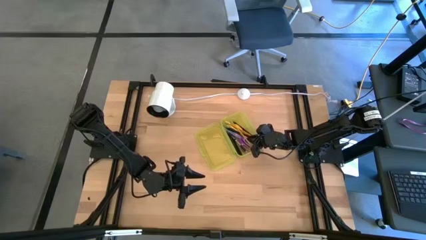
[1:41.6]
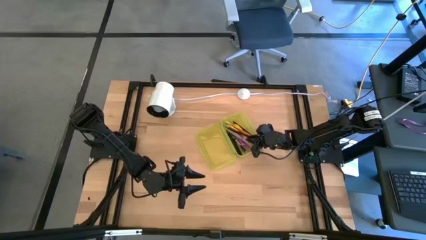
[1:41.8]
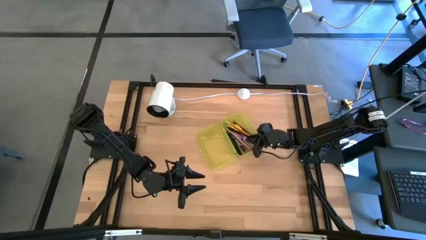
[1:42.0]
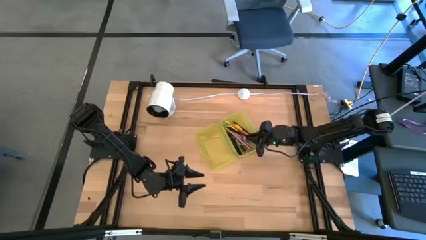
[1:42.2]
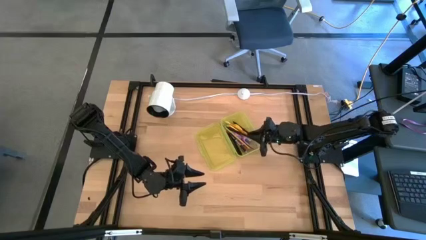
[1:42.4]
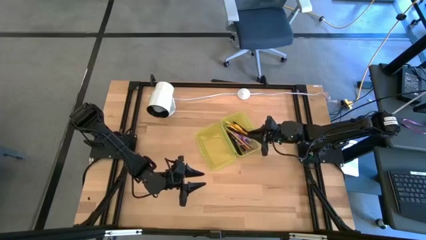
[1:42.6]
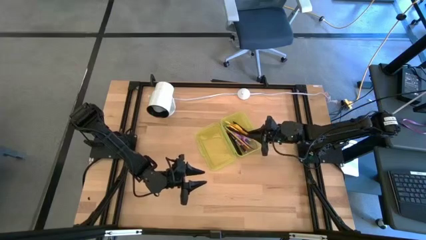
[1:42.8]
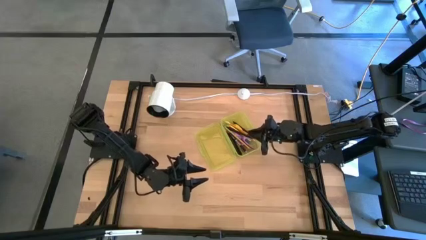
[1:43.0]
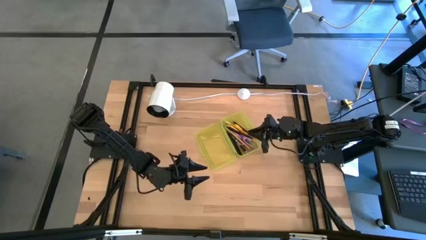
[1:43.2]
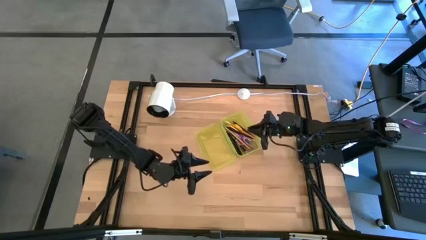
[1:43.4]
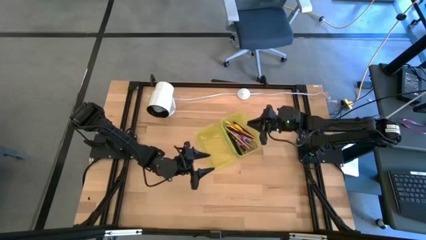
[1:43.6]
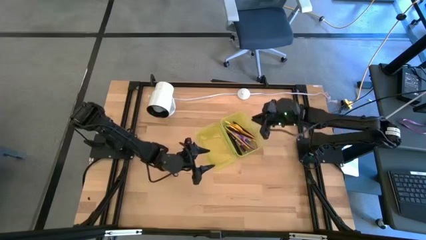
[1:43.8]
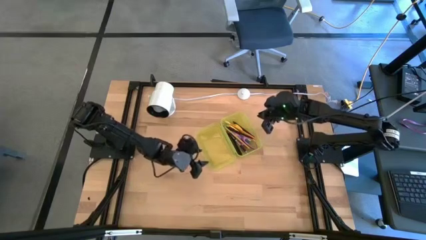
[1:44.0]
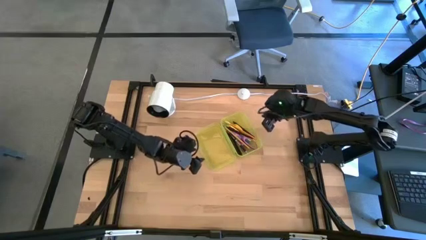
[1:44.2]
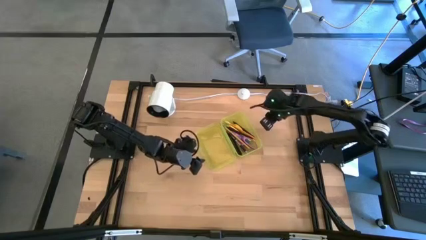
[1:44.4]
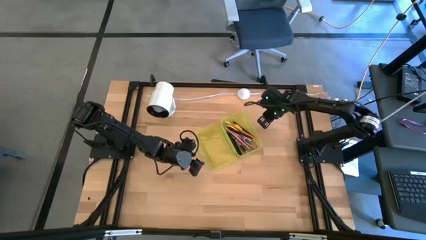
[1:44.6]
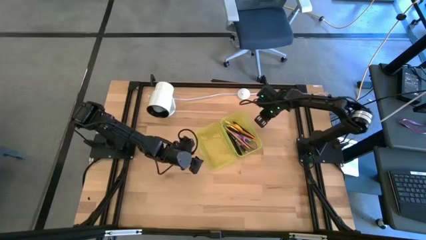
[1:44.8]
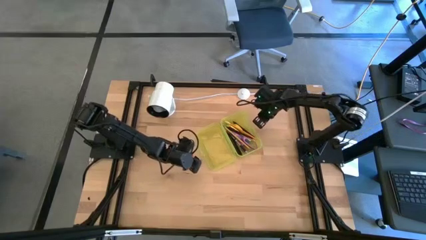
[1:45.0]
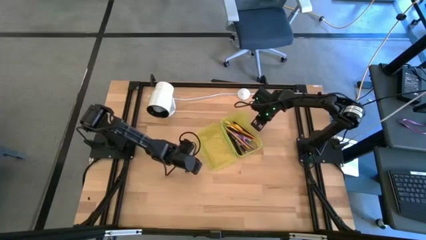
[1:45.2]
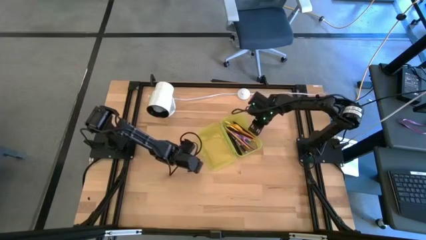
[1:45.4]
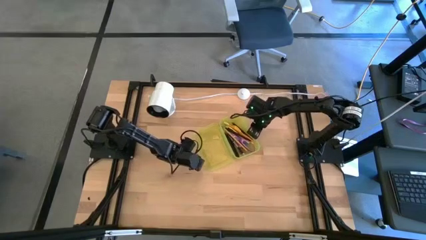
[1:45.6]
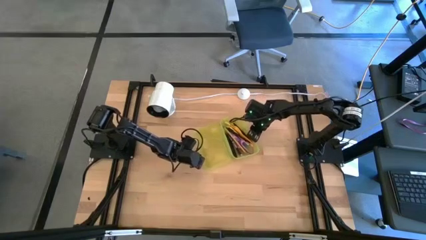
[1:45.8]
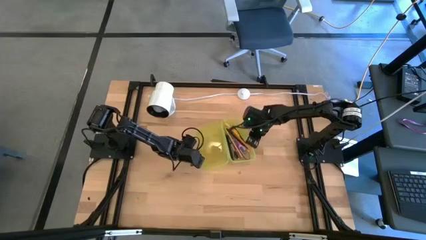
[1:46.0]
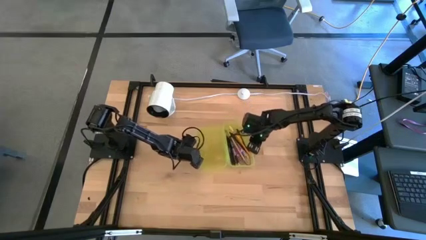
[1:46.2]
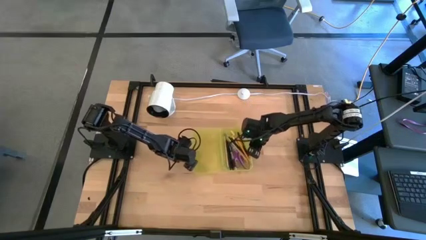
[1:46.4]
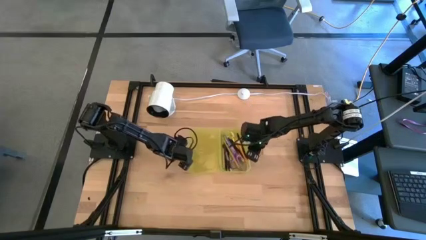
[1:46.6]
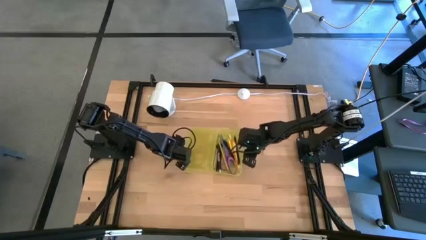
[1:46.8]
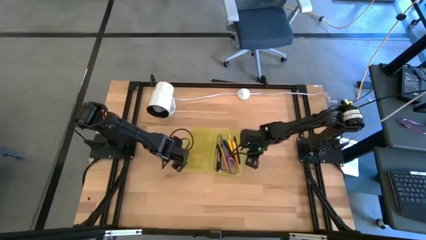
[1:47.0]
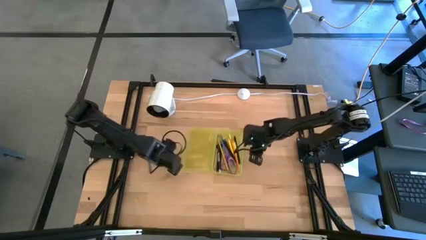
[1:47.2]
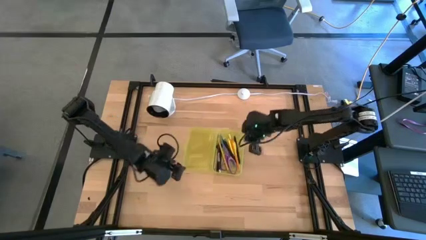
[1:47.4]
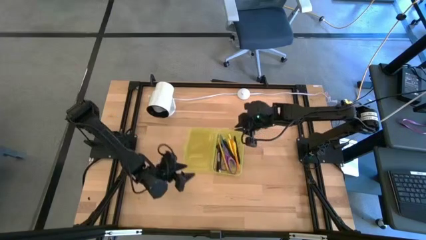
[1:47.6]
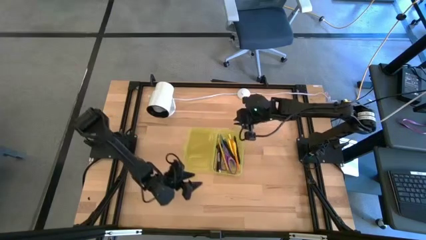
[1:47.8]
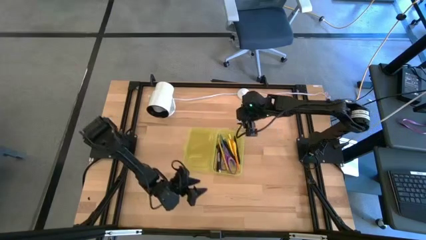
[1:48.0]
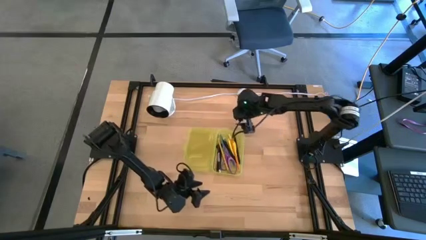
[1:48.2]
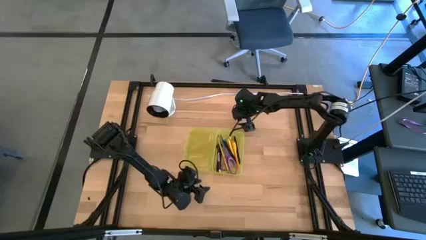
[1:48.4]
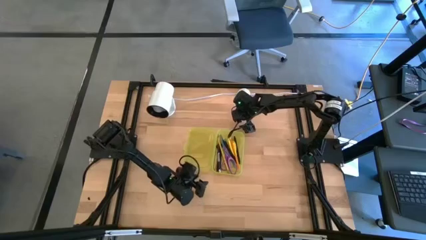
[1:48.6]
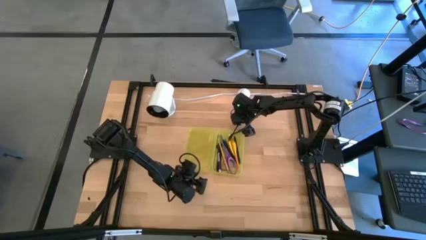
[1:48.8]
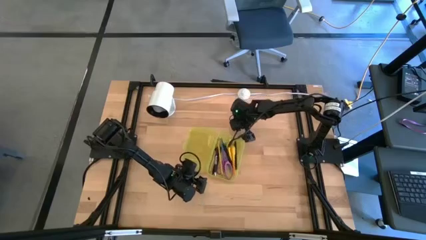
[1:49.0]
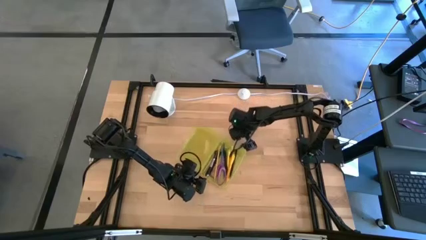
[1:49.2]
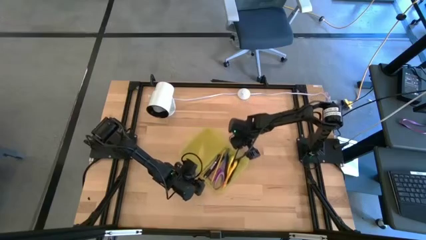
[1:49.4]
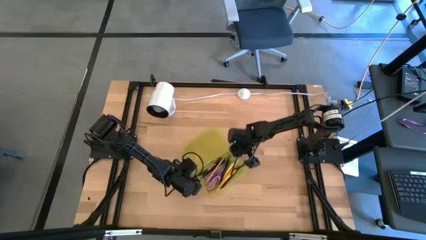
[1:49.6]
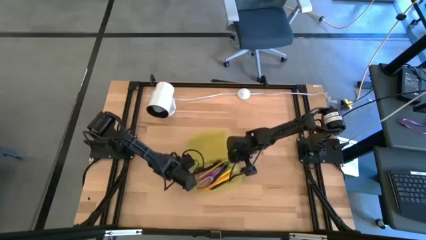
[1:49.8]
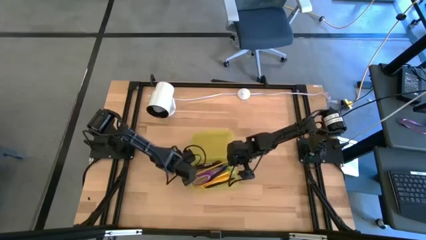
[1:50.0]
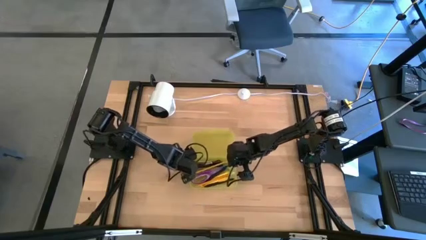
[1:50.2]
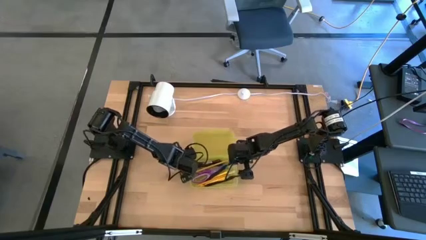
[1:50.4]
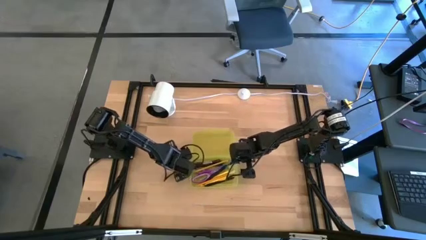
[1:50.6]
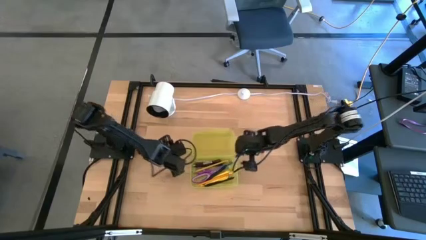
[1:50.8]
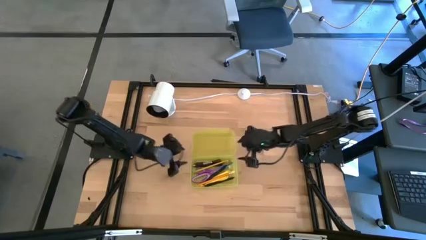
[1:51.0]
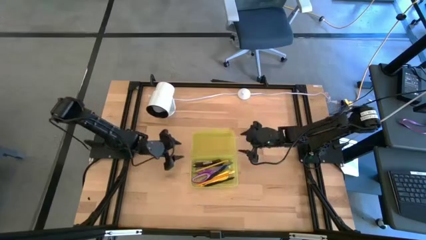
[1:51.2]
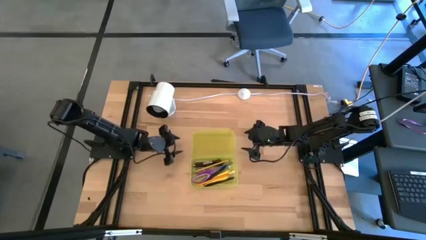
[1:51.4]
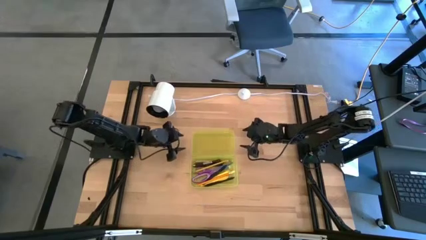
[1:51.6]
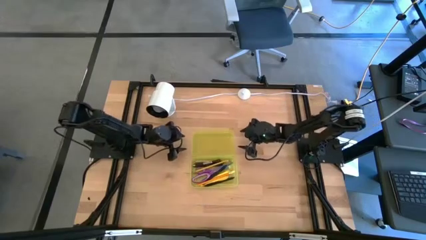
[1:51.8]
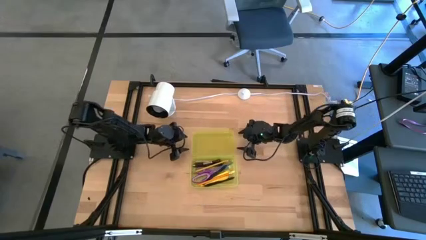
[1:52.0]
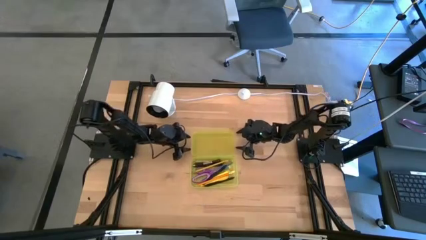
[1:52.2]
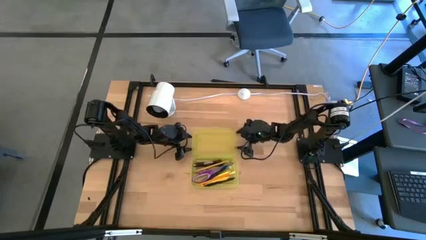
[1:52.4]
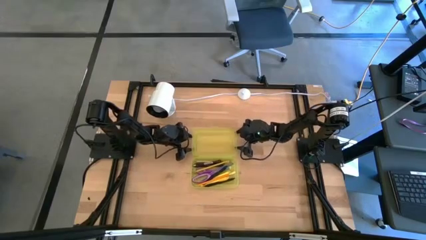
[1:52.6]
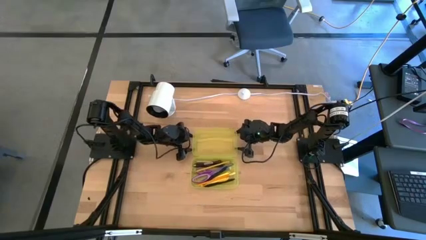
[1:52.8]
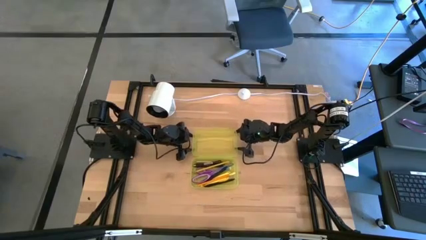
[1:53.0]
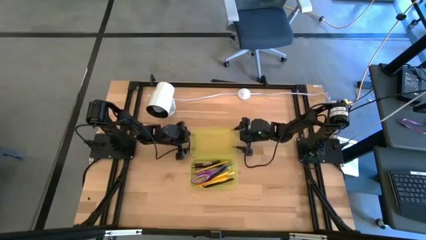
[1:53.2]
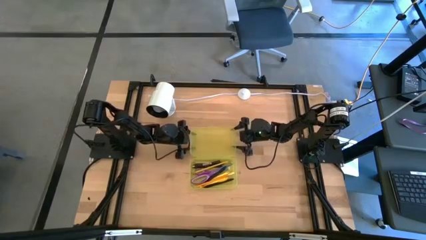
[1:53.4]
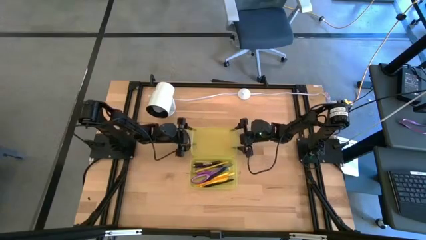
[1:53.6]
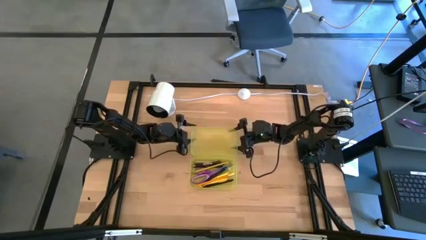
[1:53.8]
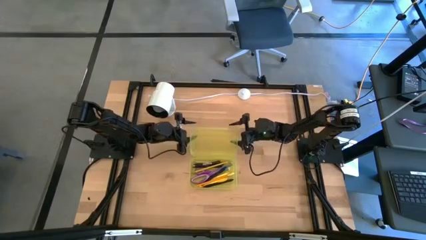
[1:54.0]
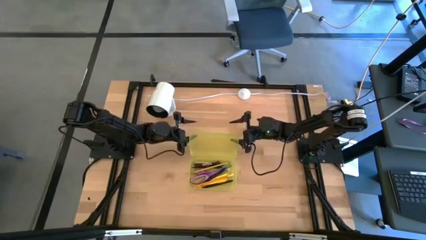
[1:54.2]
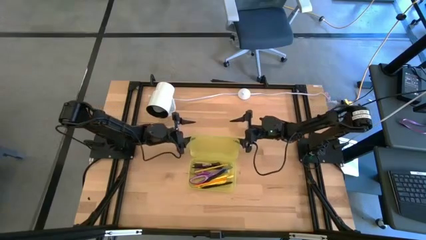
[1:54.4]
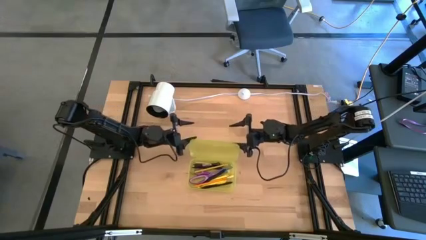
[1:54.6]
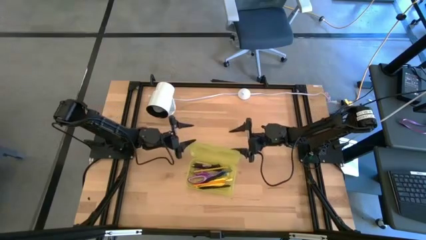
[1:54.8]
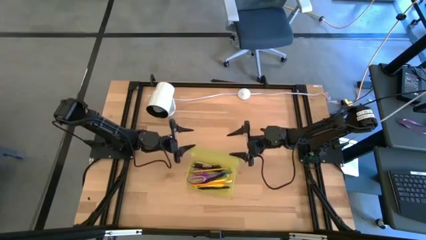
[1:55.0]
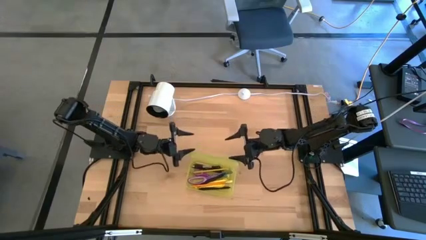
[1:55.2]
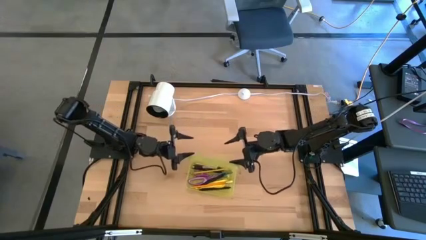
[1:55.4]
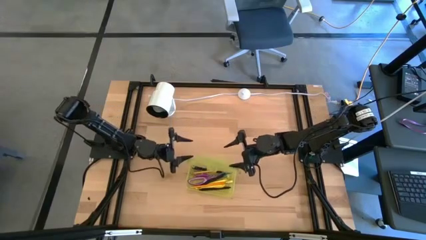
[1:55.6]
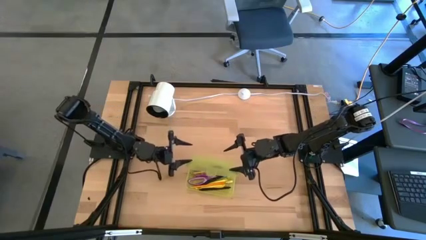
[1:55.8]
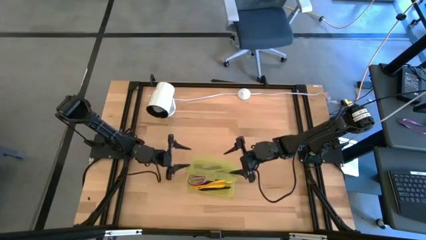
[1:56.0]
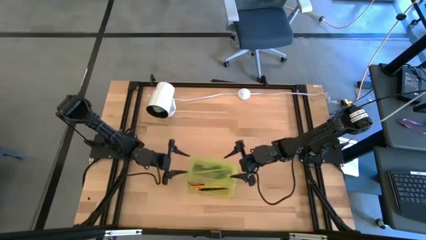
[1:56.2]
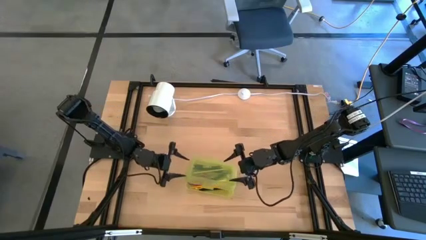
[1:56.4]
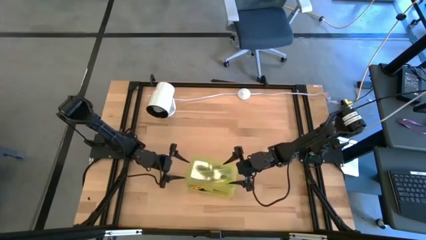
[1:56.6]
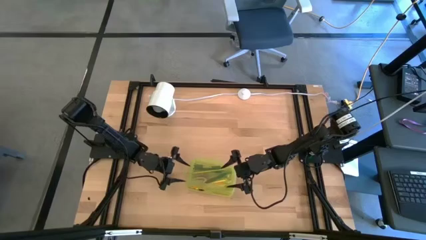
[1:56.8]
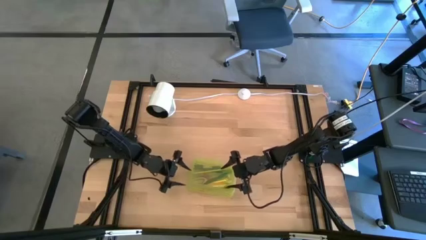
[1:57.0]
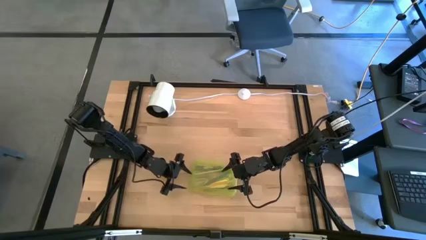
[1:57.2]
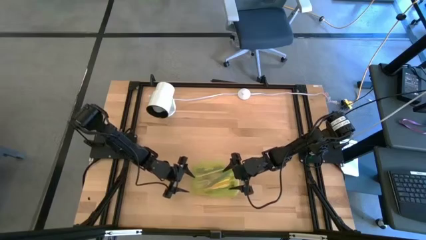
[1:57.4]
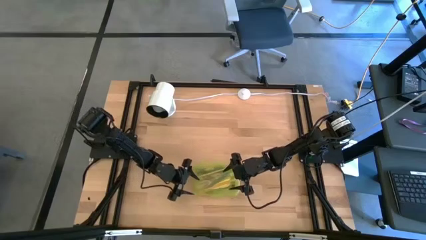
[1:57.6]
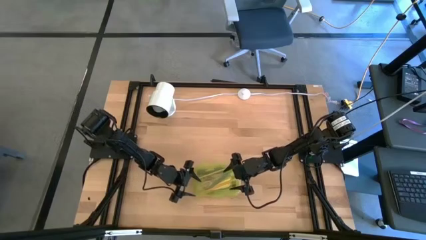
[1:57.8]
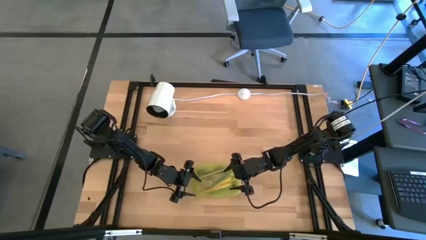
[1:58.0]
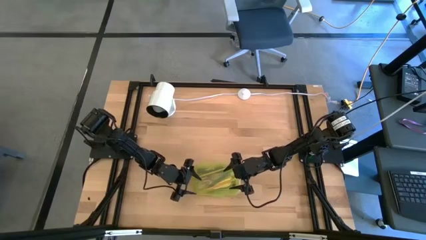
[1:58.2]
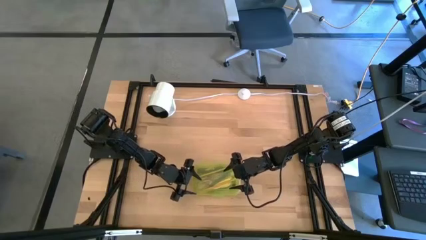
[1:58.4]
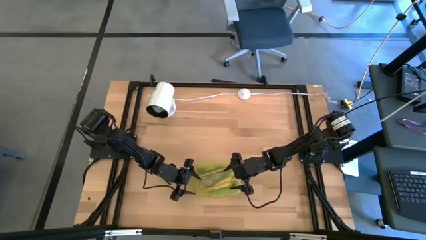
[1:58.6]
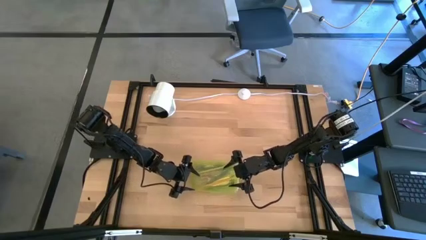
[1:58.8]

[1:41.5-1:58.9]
Task: Pick & place school supplies into a supply box
Close the yellow supply box
